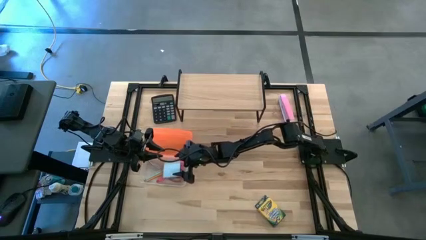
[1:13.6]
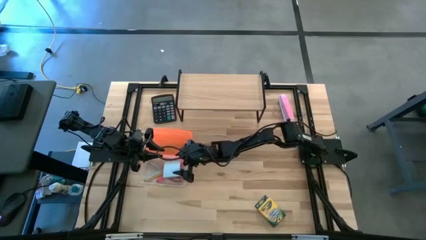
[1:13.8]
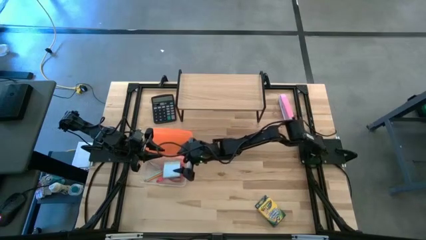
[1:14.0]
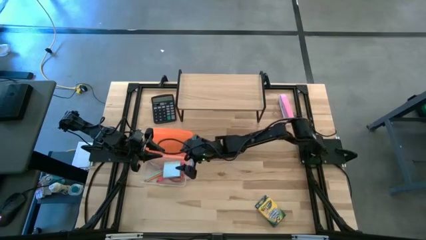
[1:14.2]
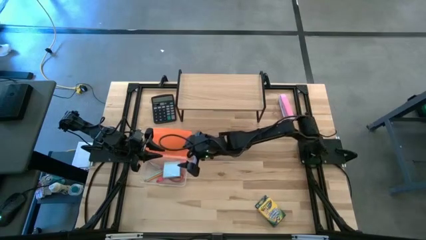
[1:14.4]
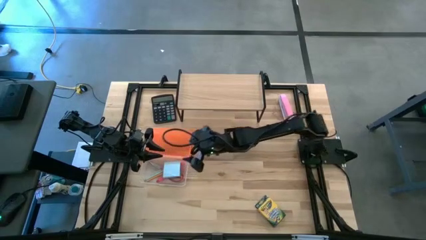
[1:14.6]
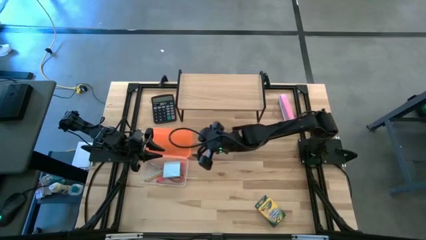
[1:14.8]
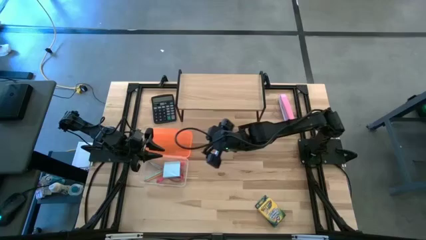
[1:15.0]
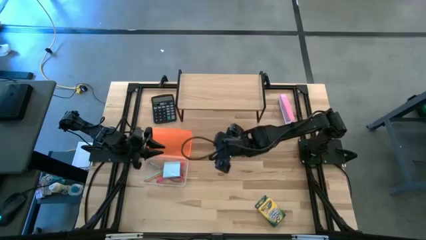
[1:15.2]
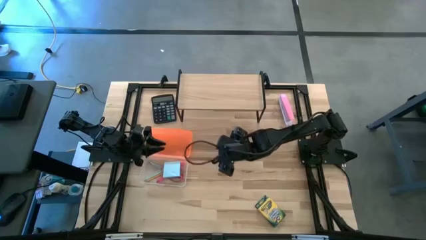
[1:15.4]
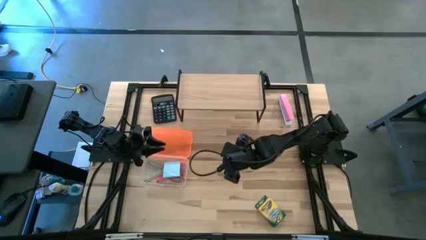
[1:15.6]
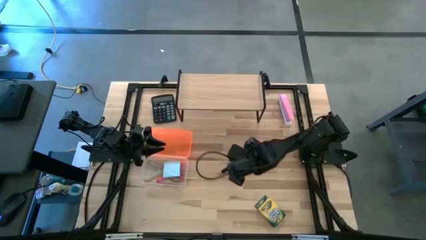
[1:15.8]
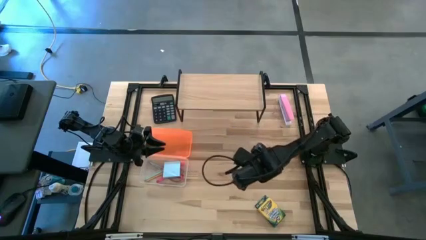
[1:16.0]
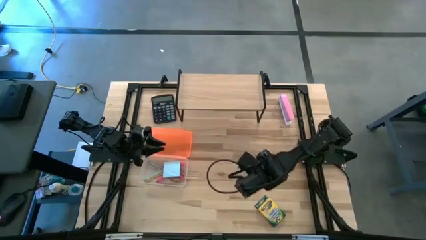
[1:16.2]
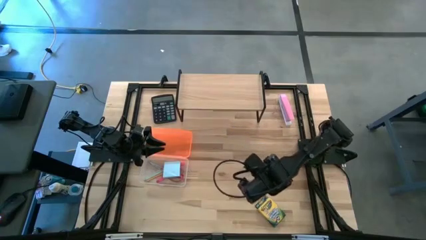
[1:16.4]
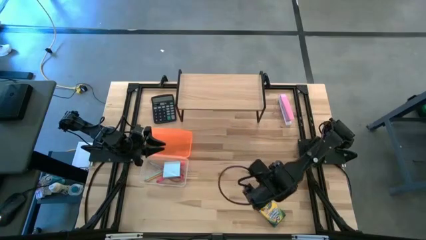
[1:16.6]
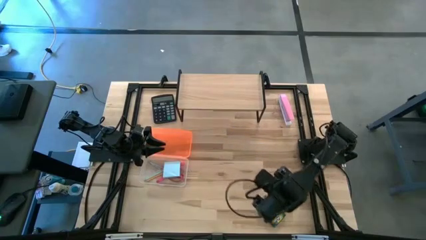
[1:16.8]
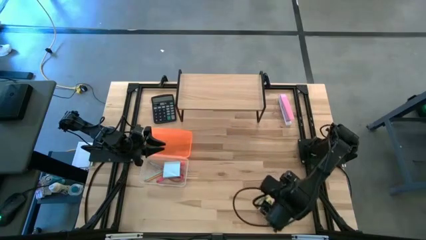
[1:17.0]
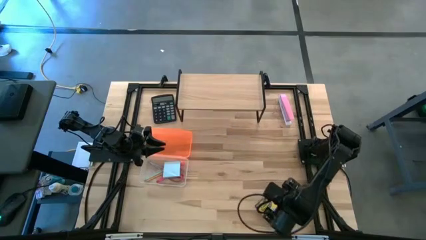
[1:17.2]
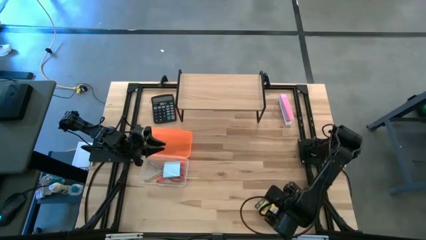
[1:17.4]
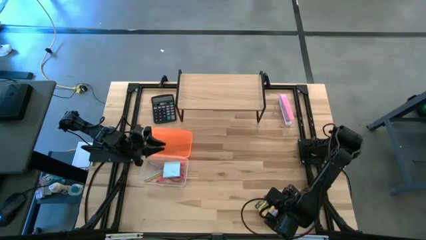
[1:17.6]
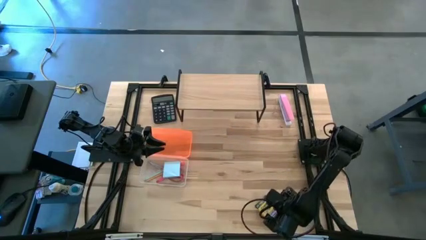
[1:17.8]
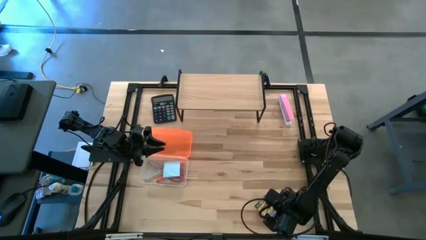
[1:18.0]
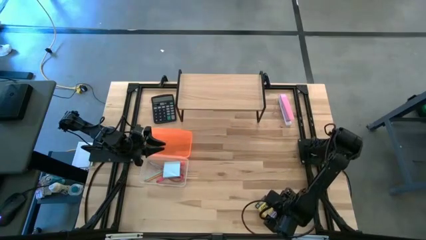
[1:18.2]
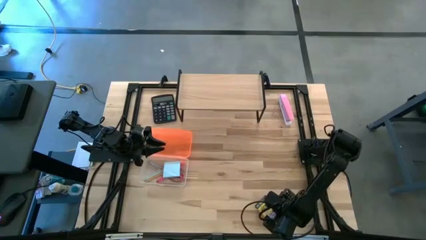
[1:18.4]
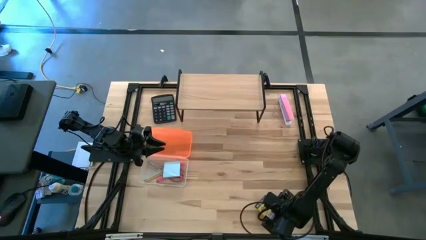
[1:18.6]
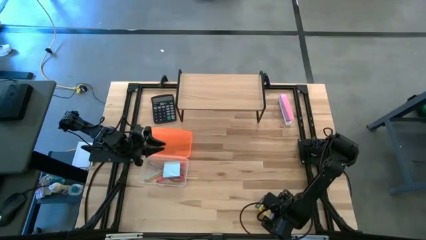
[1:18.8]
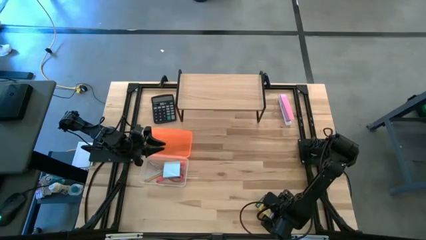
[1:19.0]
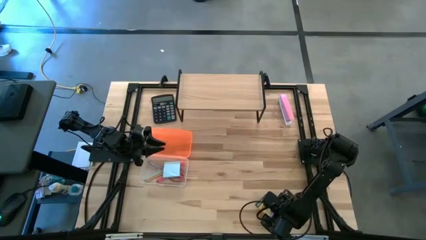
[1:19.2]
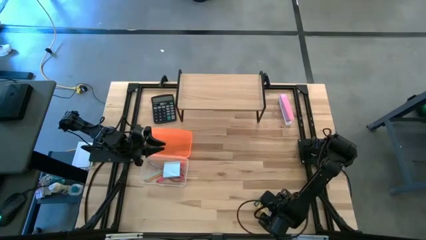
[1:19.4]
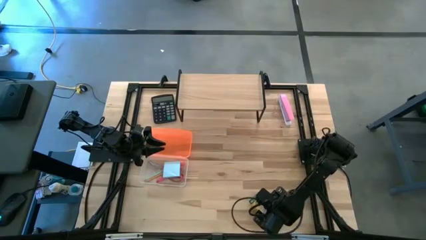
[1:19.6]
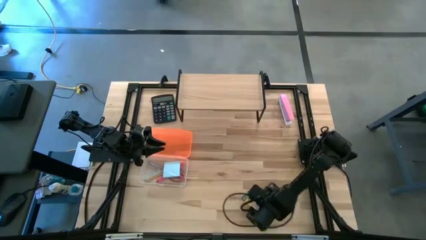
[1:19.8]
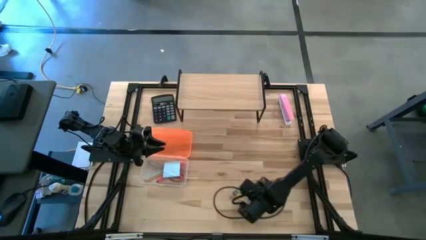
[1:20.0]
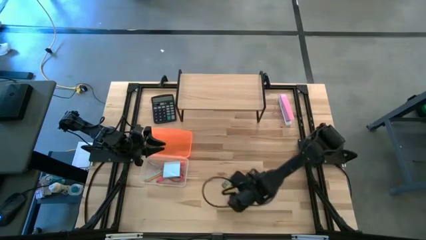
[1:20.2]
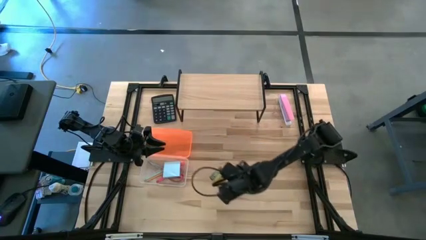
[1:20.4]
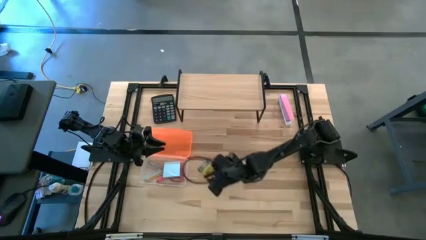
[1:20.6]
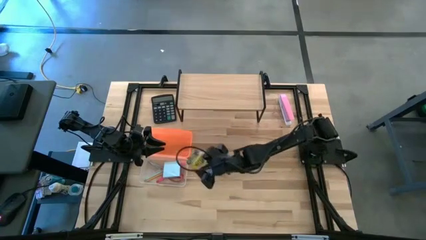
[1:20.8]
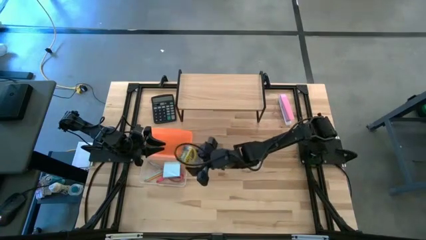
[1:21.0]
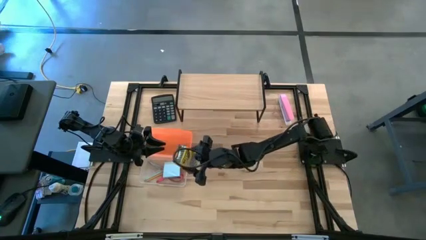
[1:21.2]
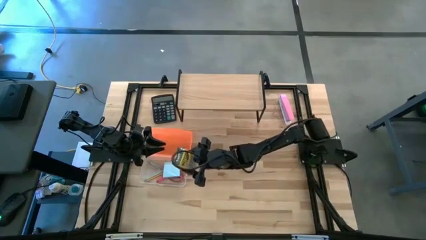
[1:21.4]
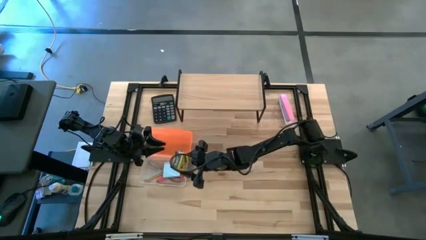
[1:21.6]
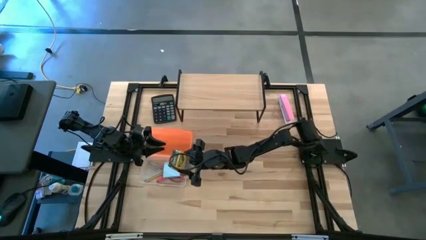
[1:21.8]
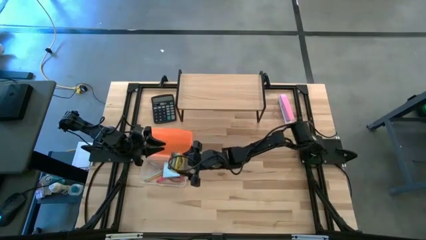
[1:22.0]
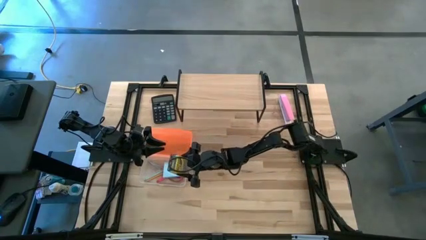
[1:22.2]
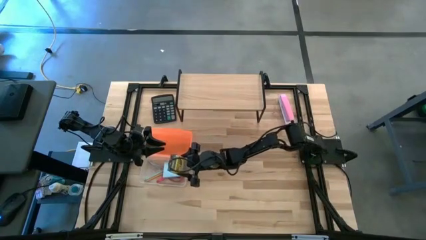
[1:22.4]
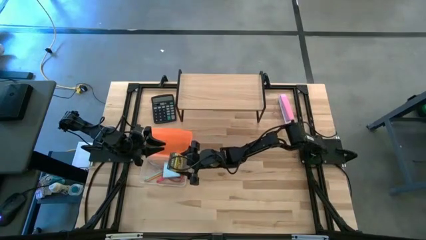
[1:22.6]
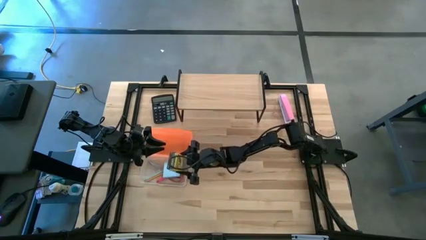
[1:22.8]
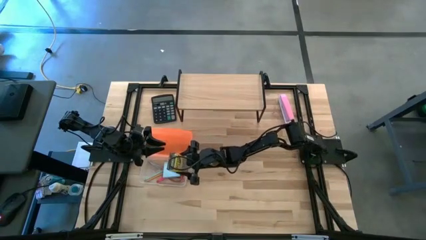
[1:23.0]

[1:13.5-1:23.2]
Task: Pack school essentials
Put the yellow crayon box into the supply box

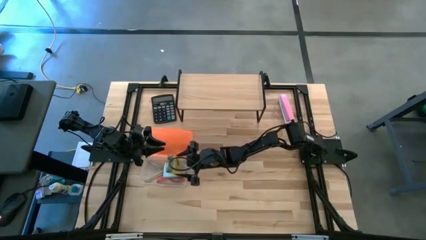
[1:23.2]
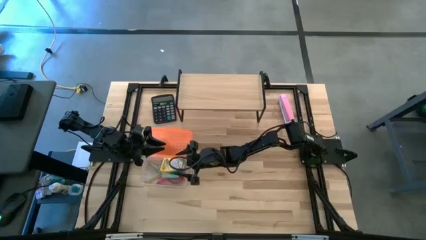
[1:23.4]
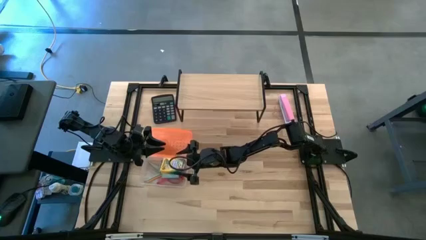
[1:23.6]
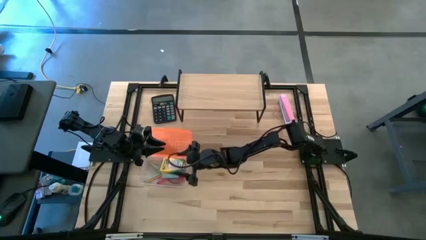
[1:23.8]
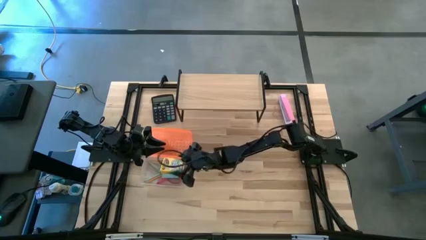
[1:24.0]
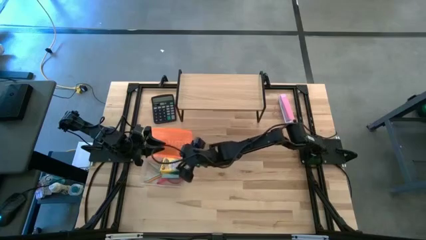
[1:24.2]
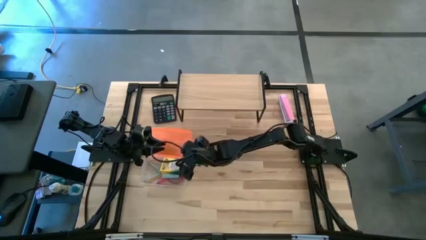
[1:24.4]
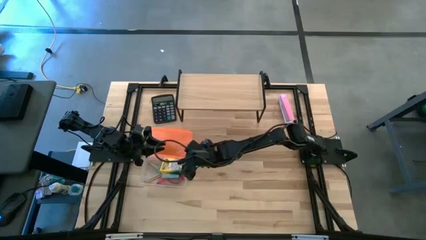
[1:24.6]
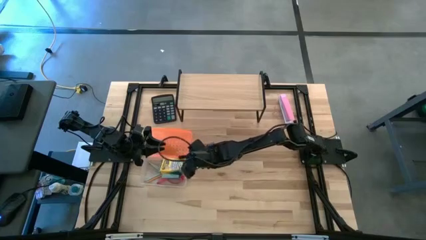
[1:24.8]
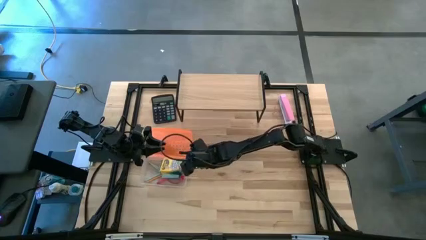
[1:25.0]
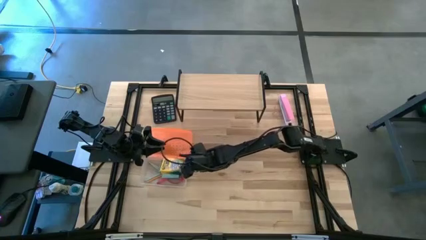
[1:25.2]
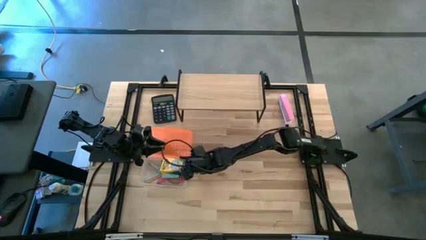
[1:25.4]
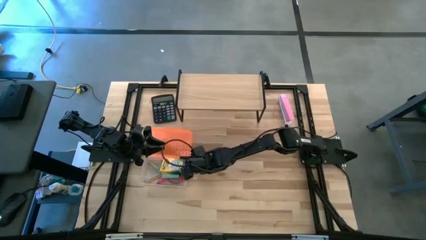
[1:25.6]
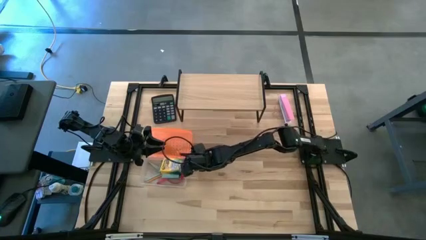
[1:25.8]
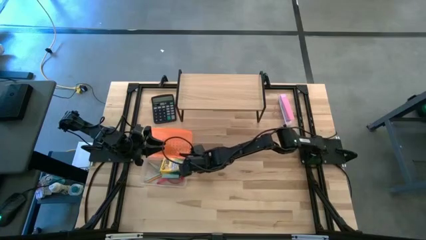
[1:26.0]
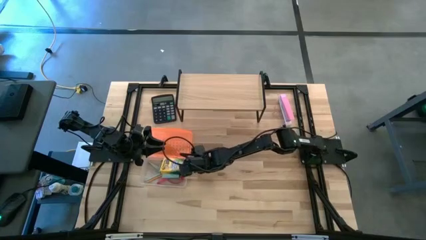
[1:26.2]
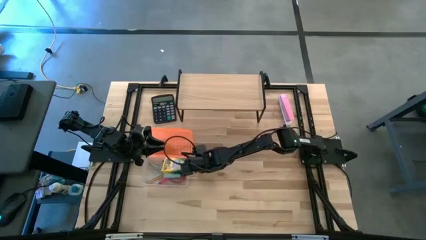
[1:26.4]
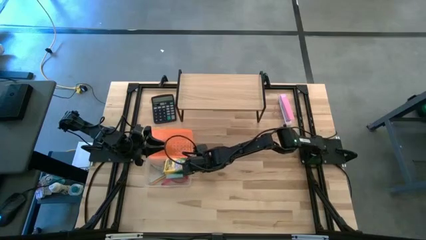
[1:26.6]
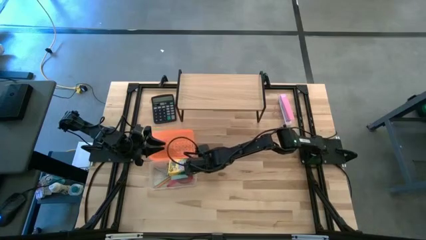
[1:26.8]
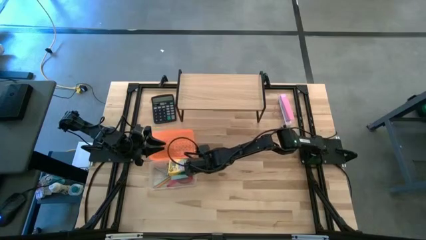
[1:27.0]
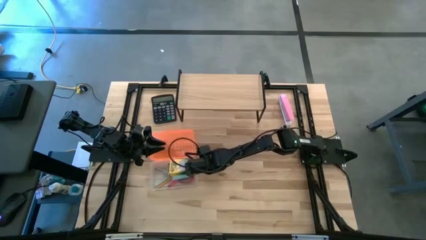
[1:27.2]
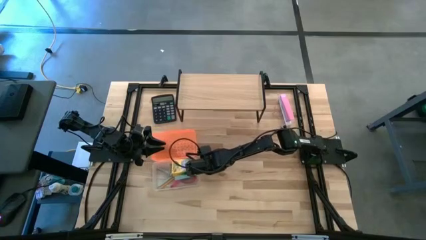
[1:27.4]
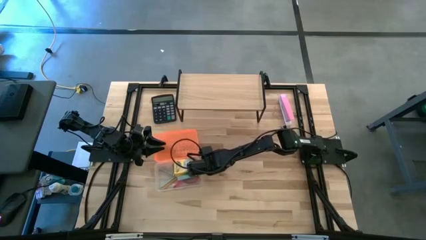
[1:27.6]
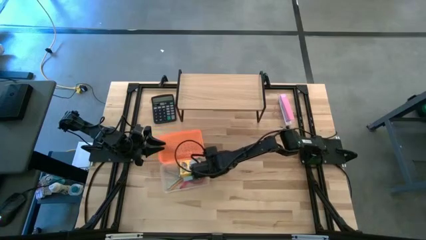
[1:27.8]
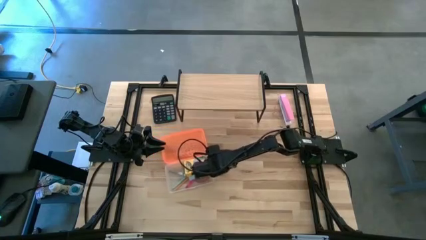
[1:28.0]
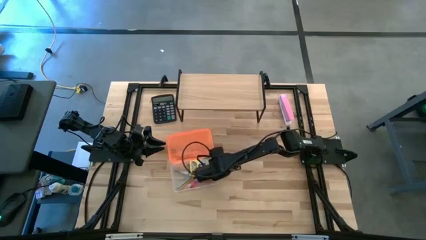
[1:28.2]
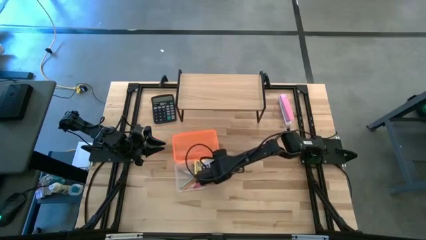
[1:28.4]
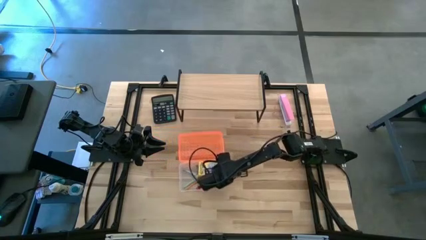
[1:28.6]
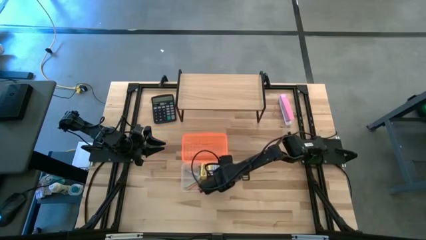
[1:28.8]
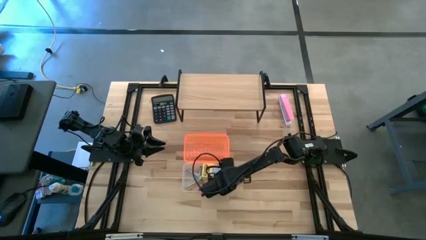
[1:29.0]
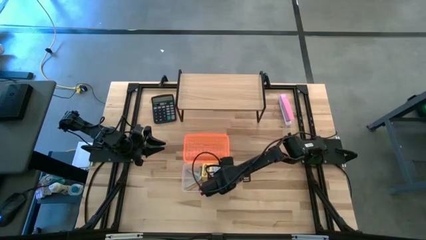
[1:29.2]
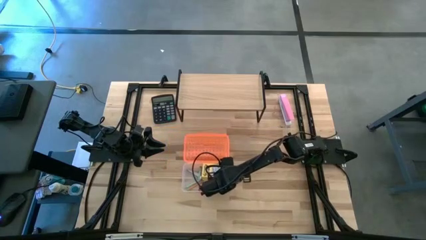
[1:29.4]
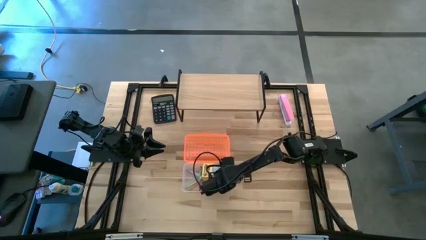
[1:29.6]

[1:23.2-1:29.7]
Move the supply box to the center of the table
